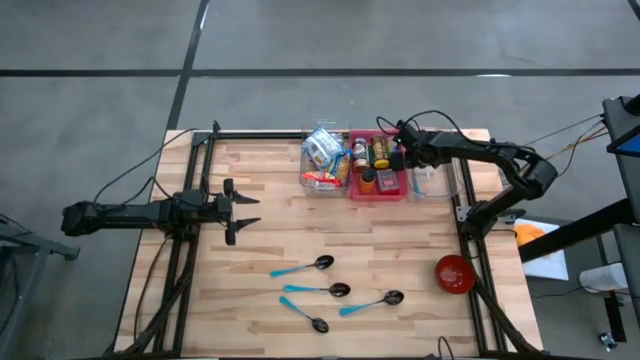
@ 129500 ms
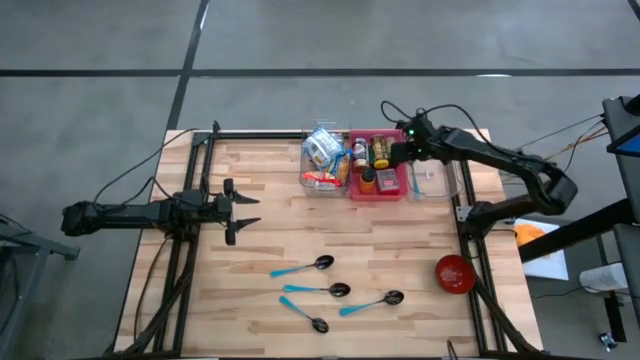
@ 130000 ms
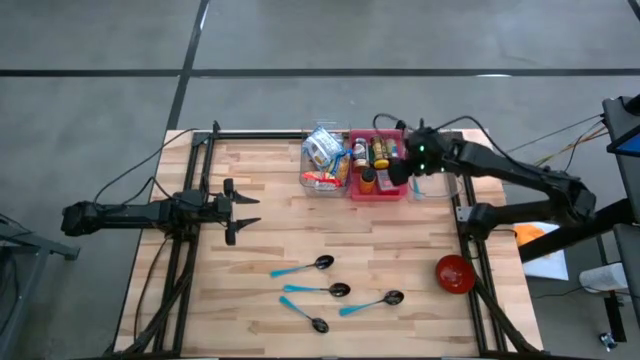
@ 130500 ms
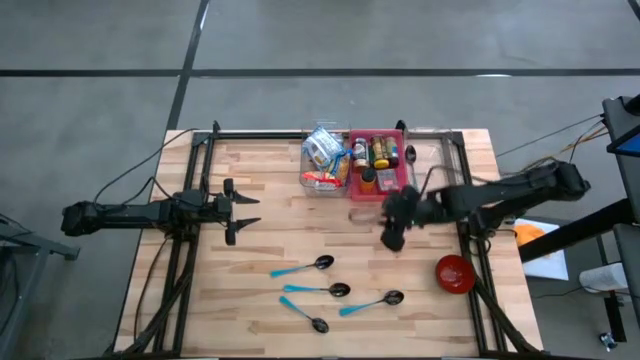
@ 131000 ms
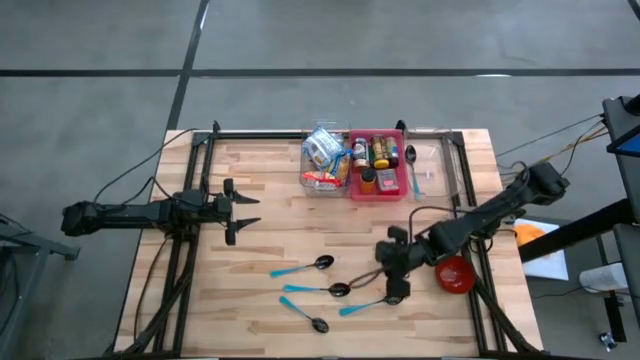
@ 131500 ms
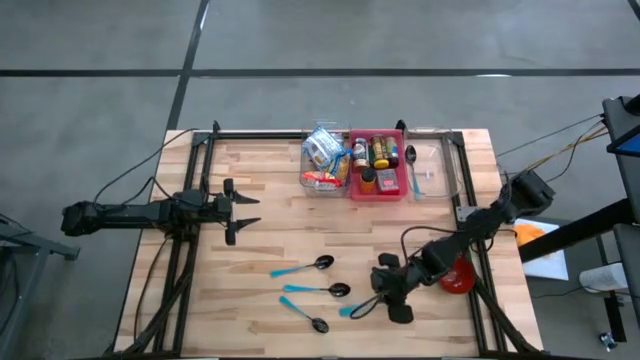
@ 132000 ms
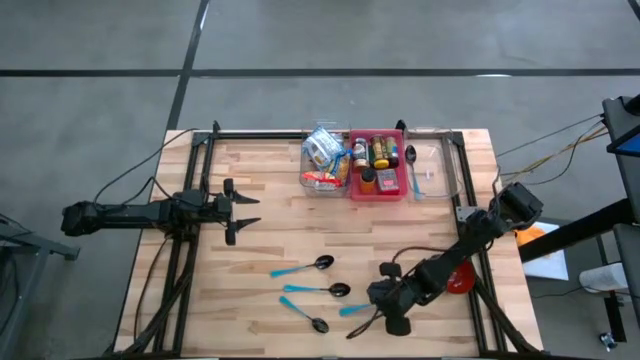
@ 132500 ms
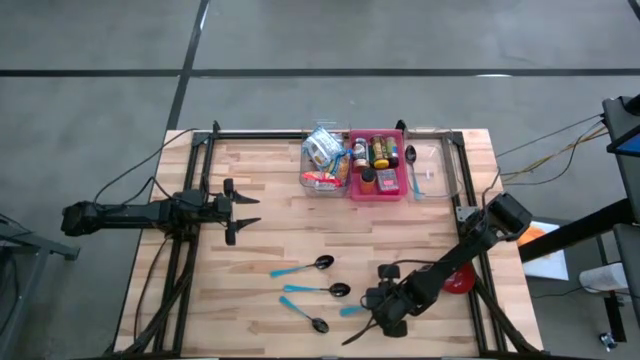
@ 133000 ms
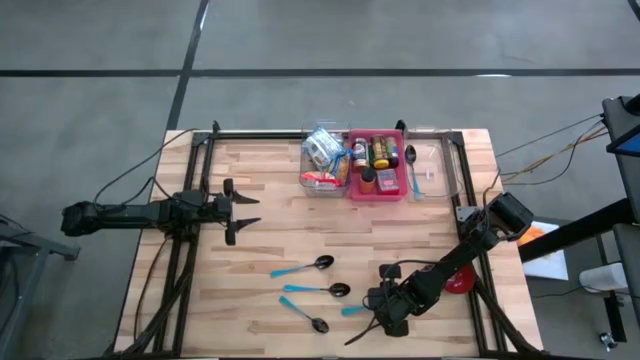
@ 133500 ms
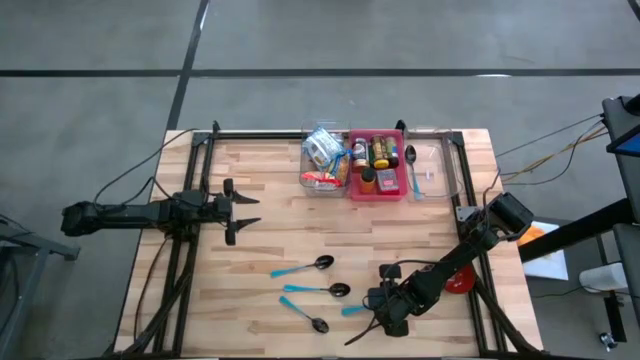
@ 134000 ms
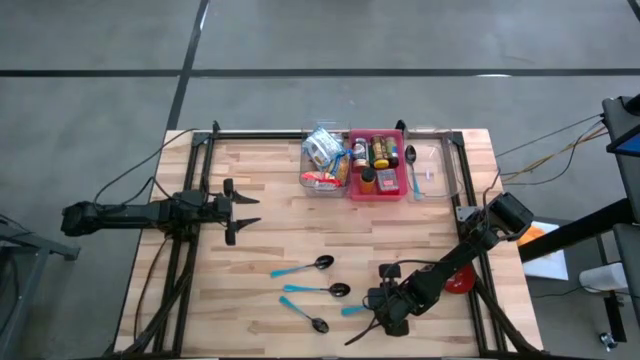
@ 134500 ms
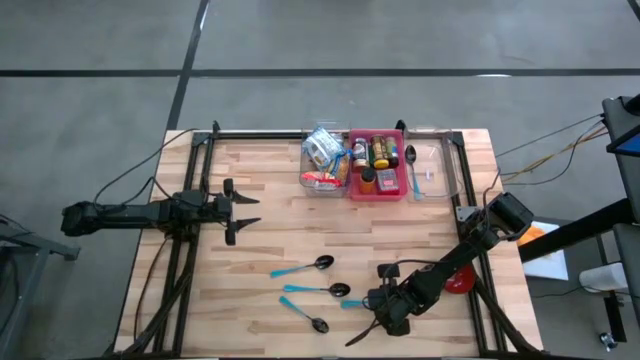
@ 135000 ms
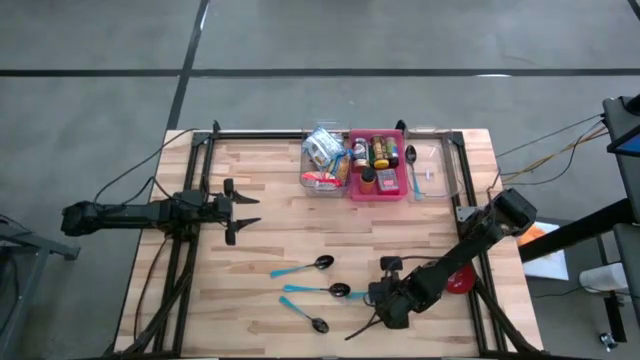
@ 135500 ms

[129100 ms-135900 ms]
Put the blue spoon into the right transparent bin

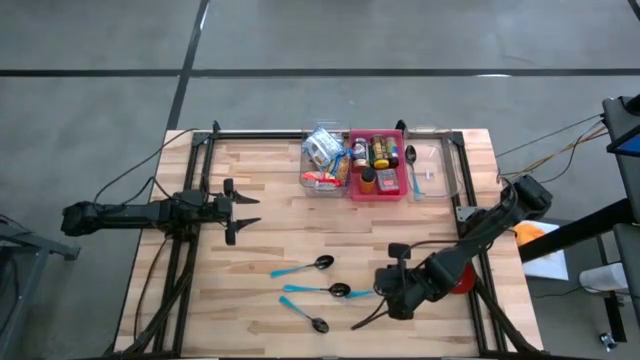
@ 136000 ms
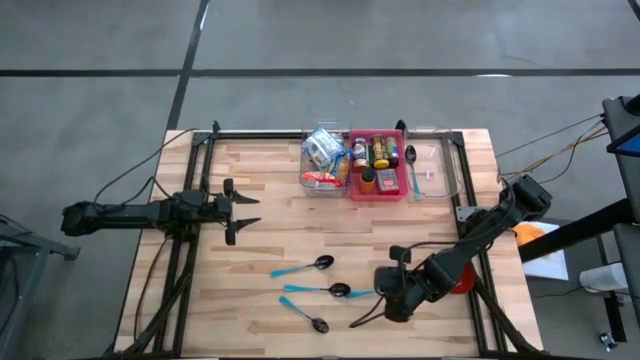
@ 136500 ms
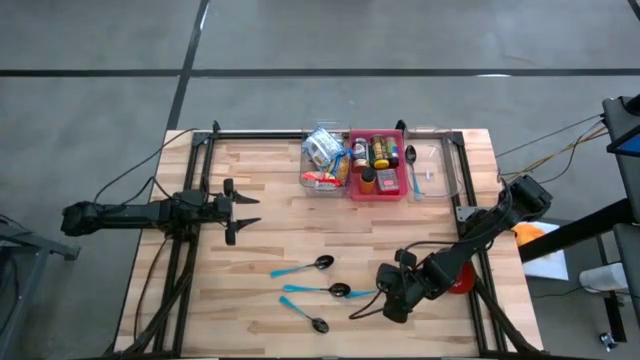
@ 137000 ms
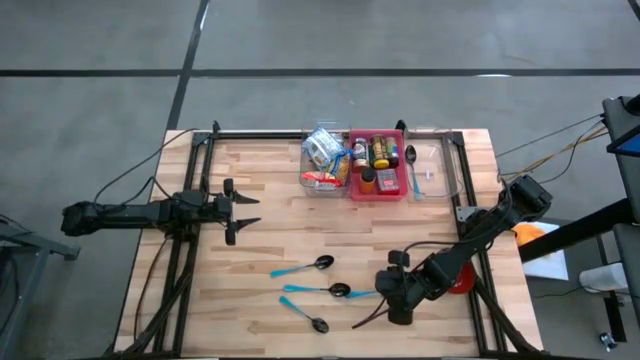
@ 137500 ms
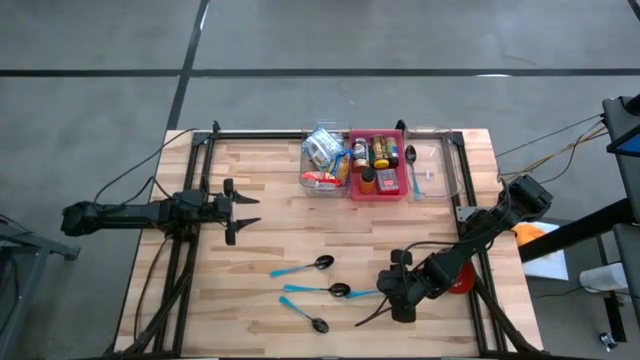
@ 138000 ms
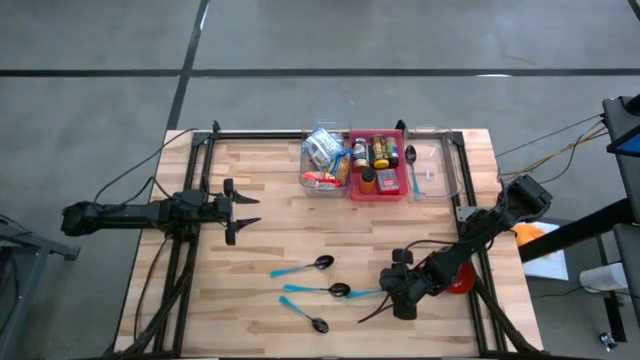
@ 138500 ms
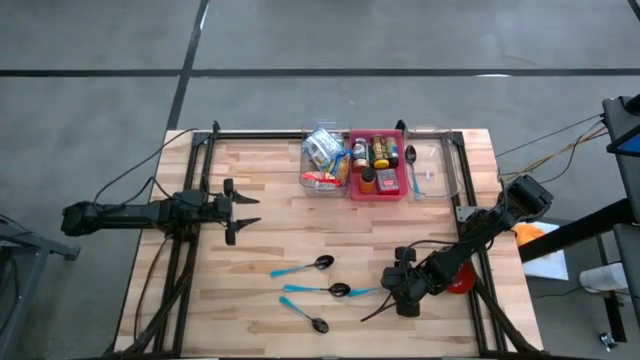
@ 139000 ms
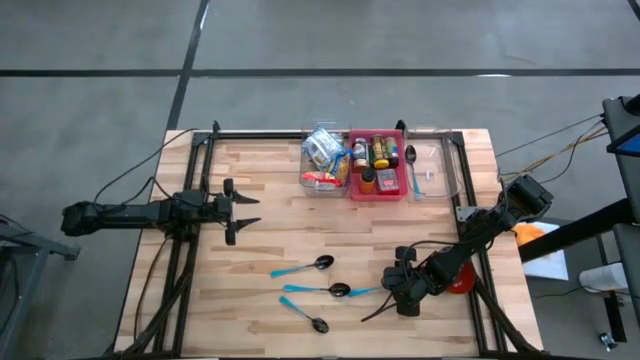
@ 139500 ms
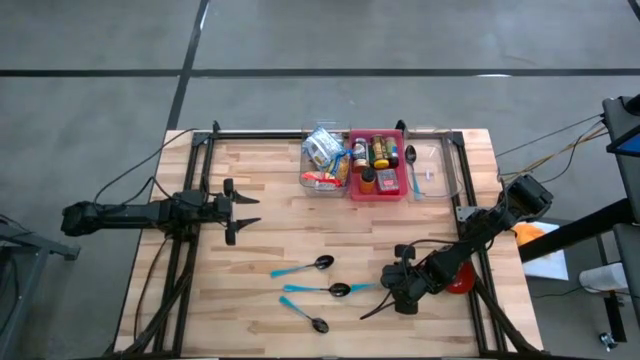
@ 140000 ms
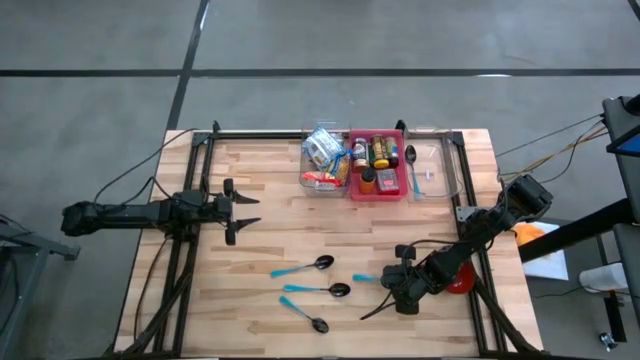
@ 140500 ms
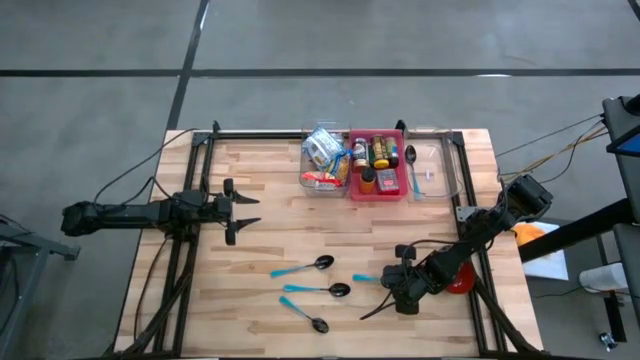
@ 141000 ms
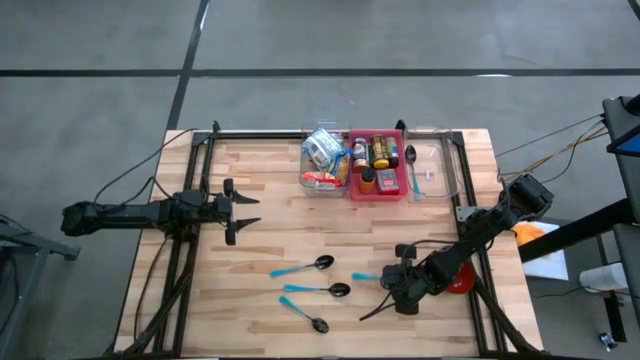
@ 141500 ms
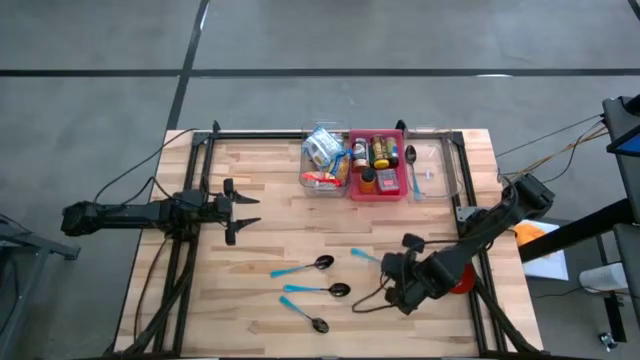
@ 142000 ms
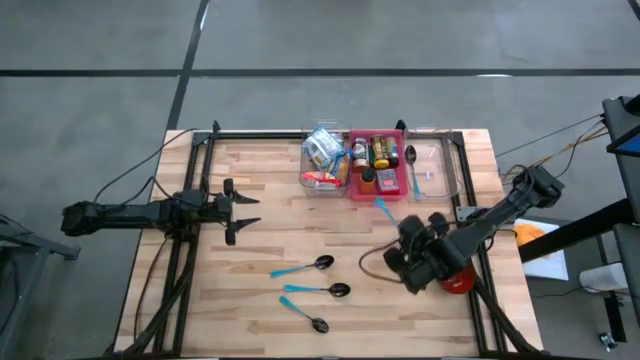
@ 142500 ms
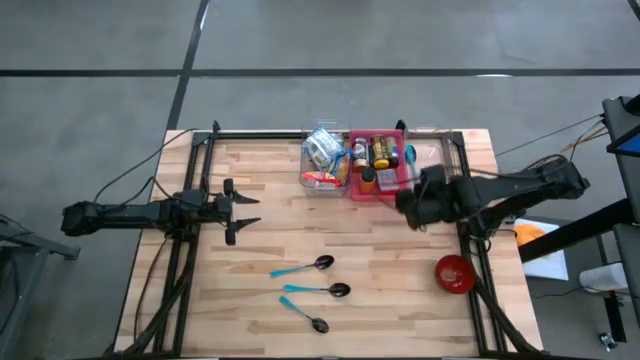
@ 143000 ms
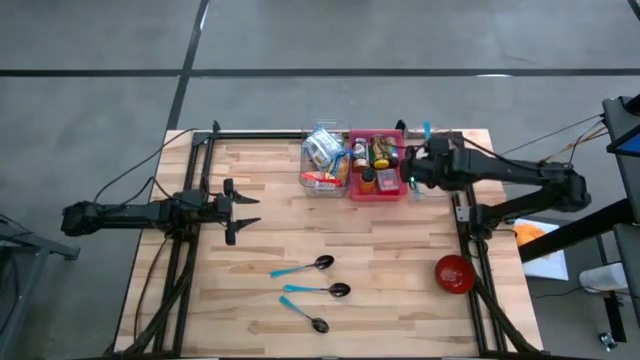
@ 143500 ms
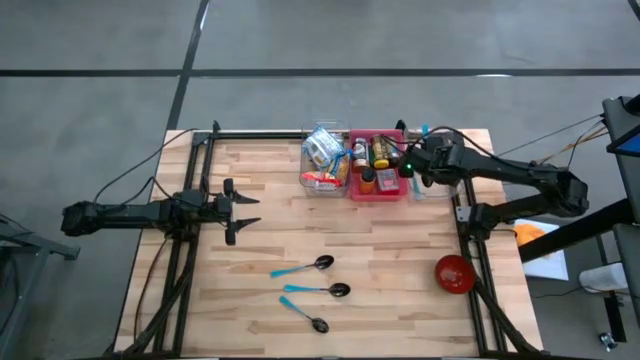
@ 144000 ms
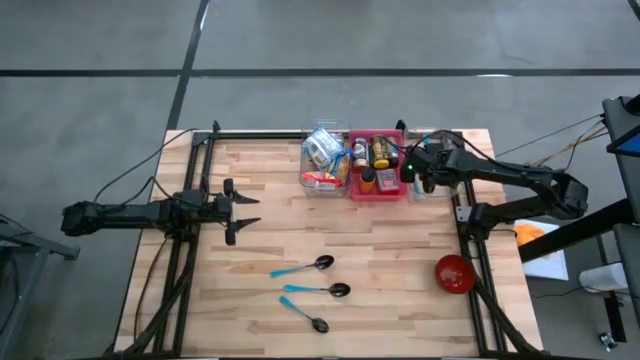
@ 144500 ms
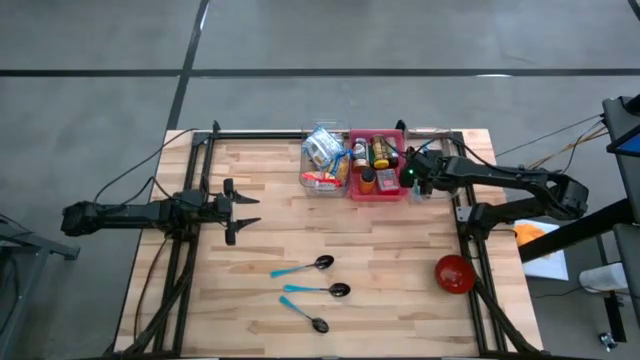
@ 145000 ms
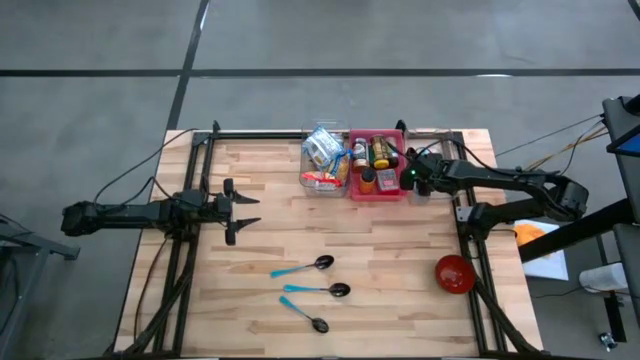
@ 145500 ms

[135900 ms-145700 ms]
Put the blue spoon into the right transparent bin

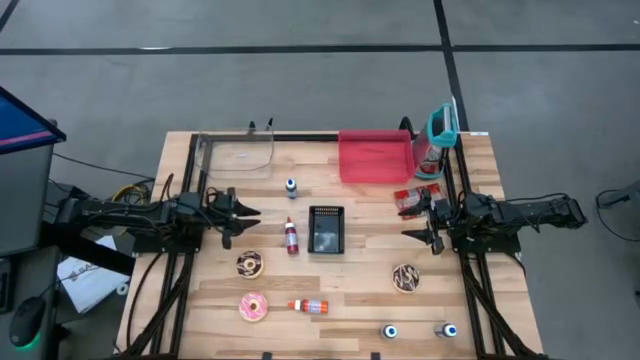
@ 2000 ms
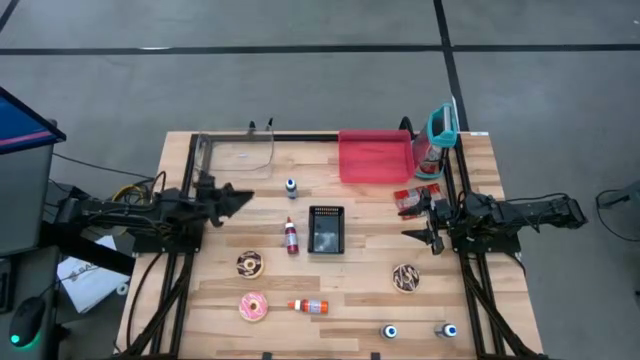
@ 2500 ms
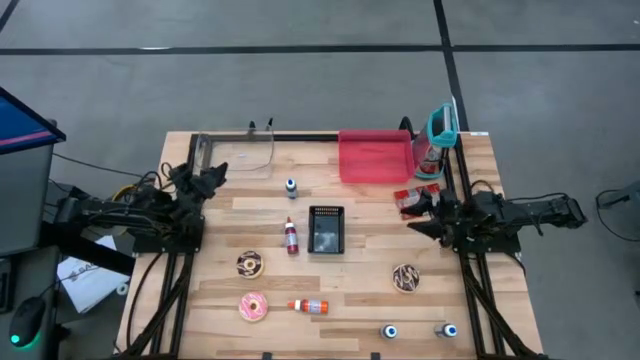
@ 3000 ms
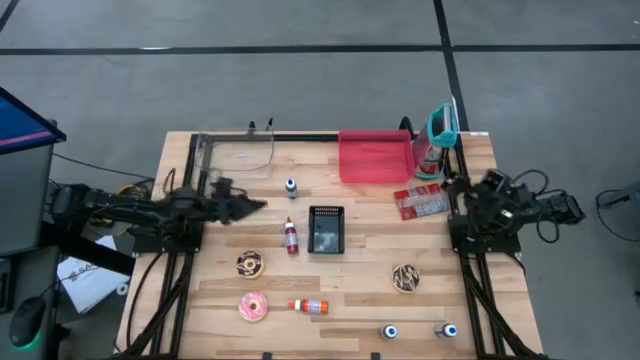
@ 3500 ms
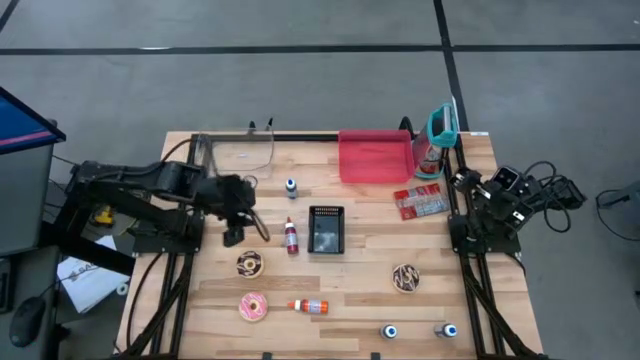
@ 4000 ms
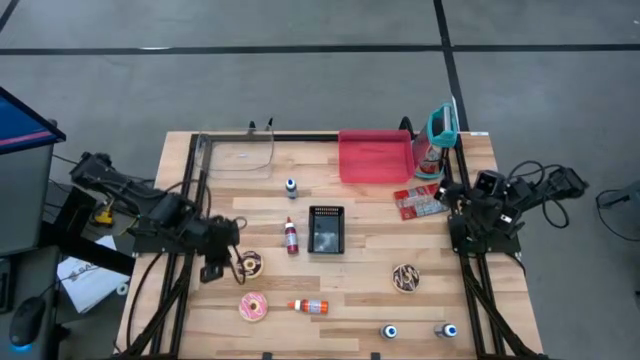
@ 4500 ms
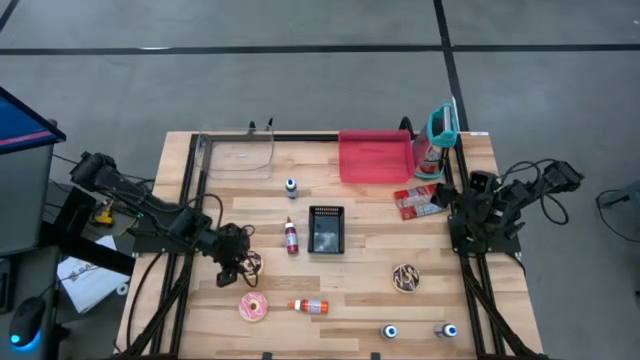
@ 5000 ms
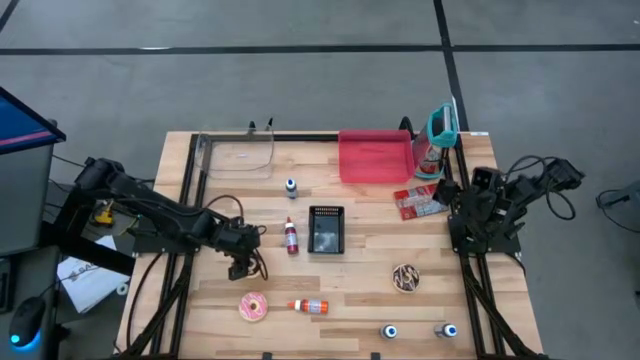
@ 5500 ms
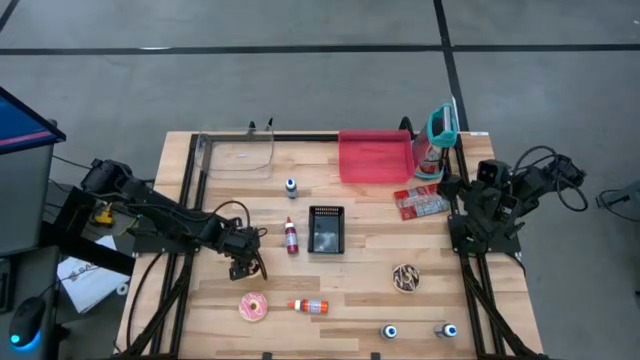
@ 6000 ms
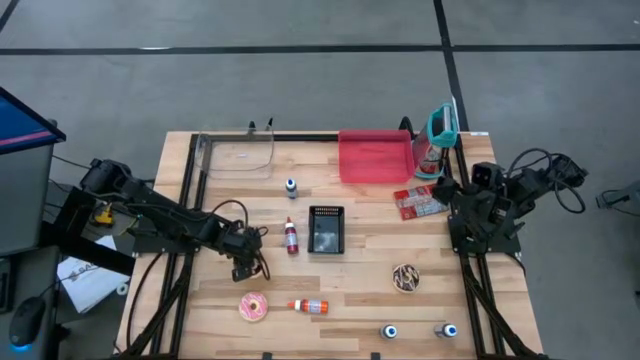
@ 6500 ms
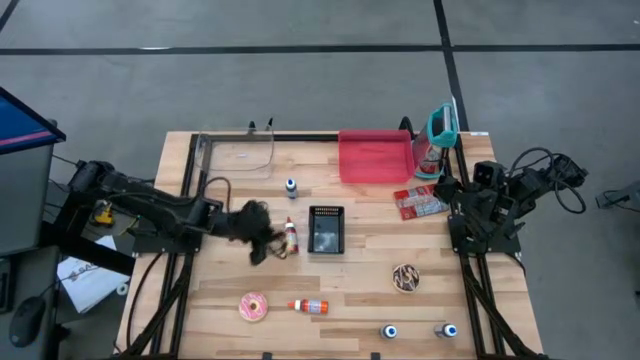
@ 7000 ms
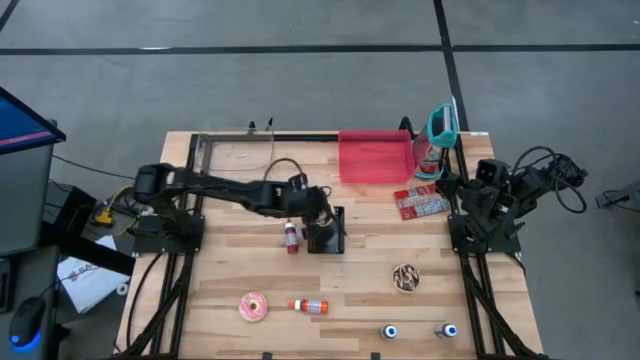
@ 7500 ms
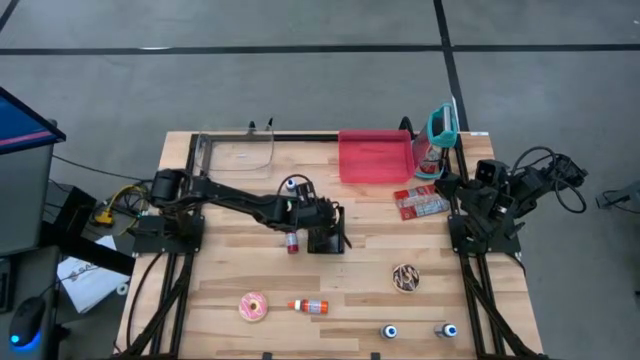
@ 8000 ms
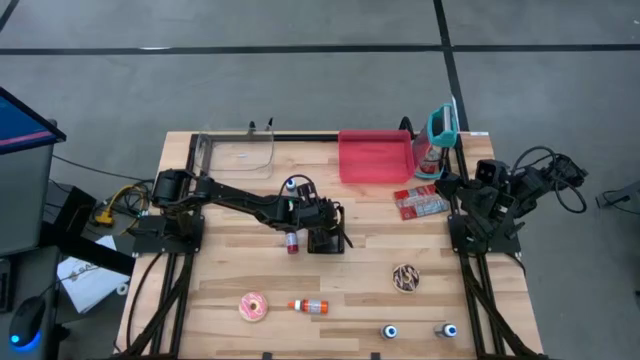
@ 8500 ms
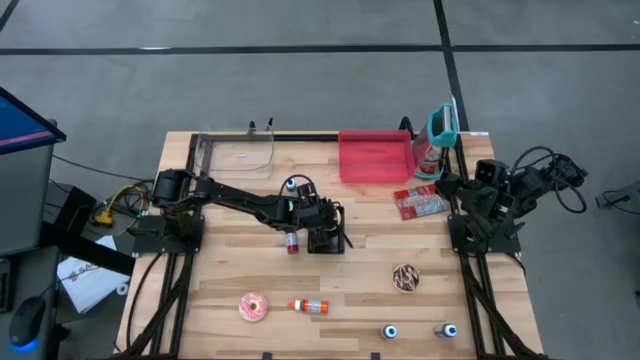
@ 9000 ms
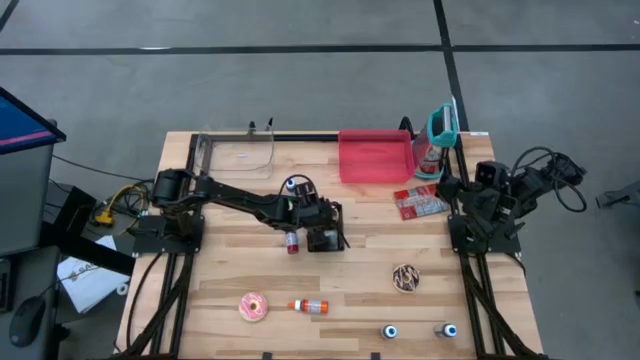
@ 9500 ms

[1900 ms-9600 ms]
Put the left black donut into the black basket
